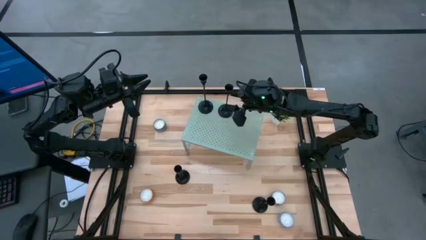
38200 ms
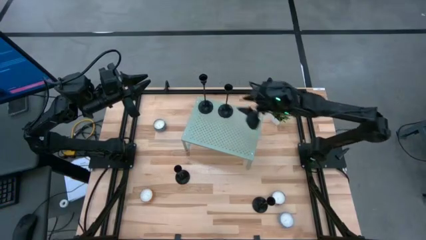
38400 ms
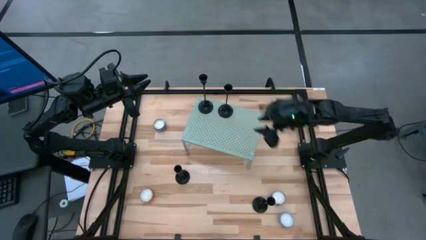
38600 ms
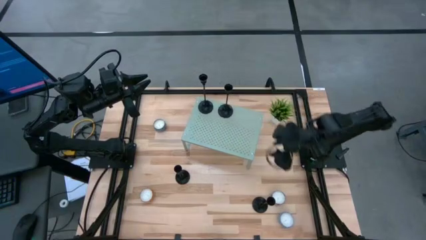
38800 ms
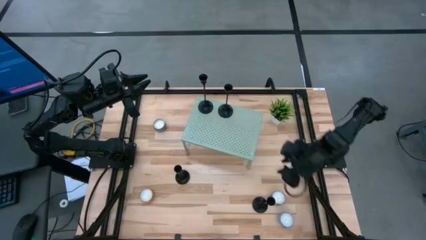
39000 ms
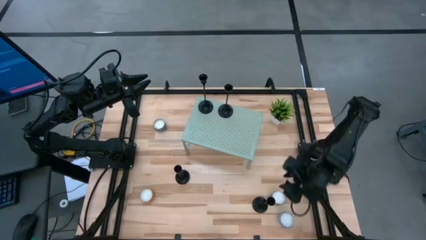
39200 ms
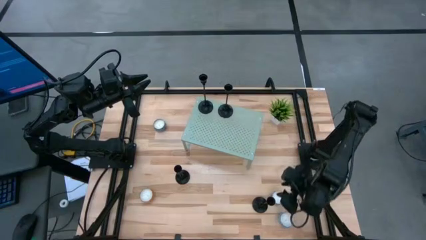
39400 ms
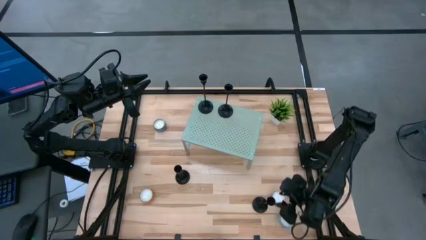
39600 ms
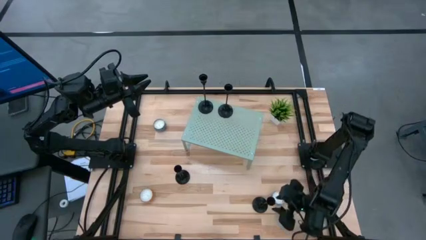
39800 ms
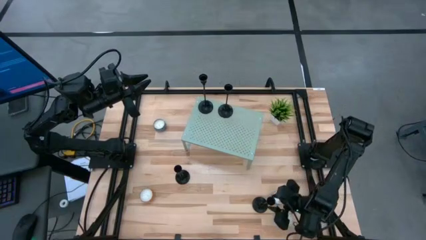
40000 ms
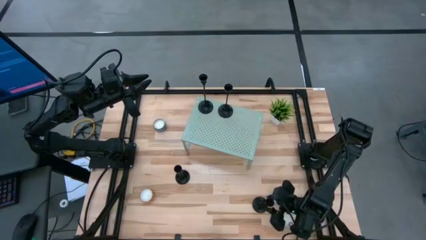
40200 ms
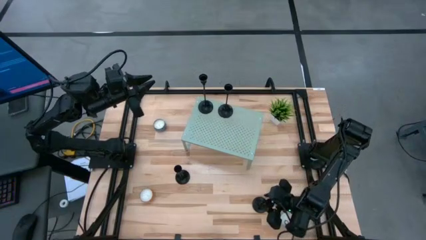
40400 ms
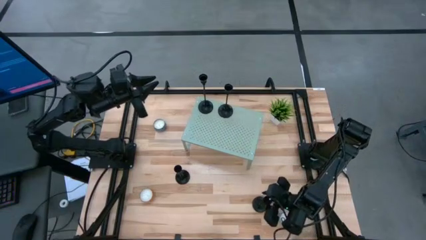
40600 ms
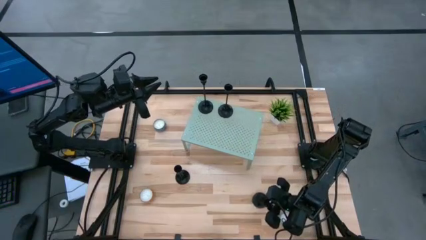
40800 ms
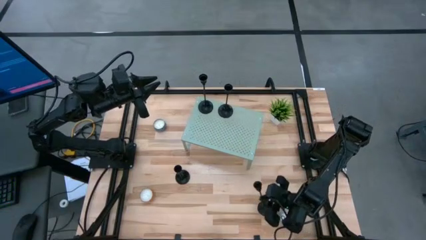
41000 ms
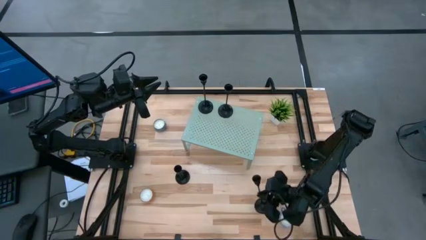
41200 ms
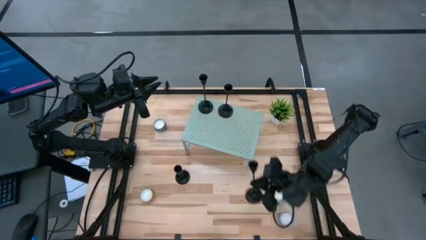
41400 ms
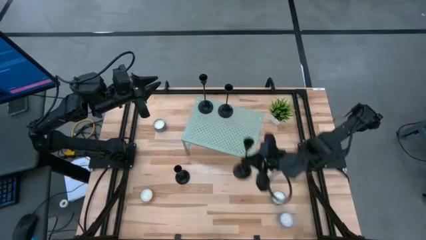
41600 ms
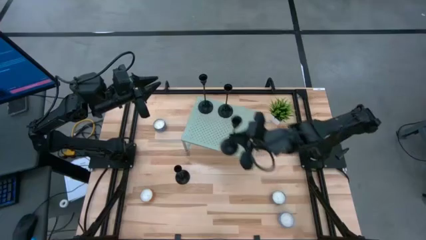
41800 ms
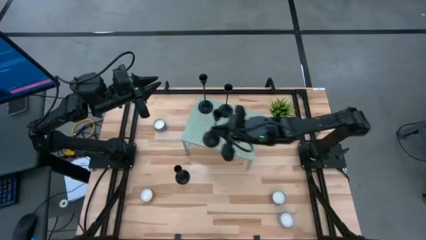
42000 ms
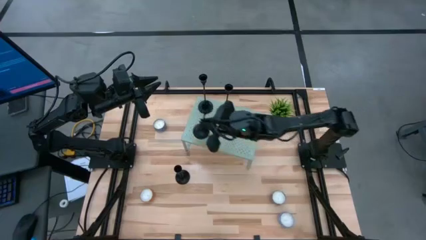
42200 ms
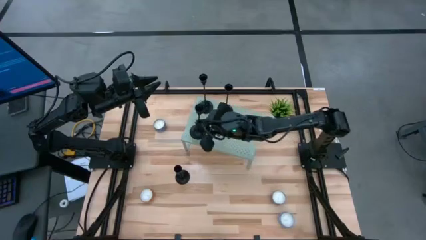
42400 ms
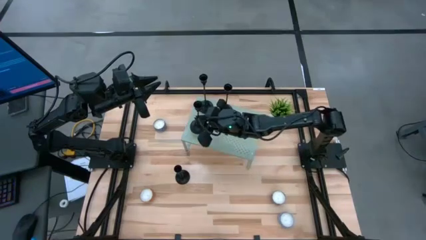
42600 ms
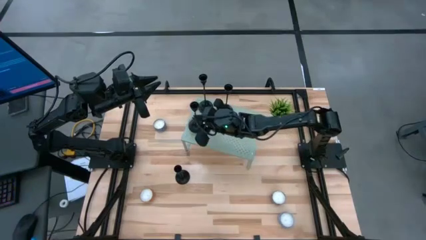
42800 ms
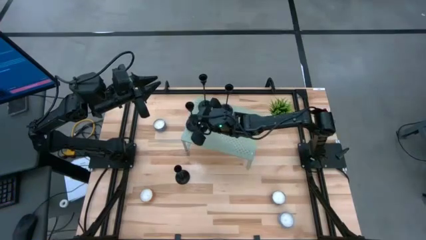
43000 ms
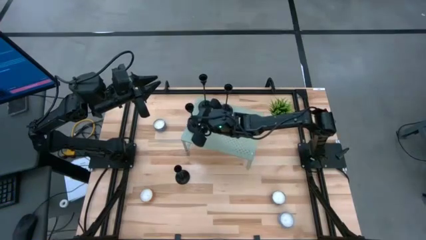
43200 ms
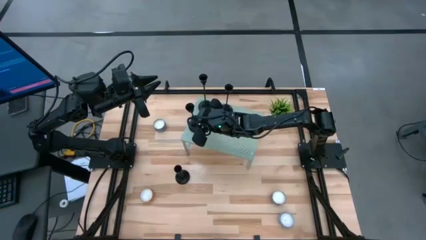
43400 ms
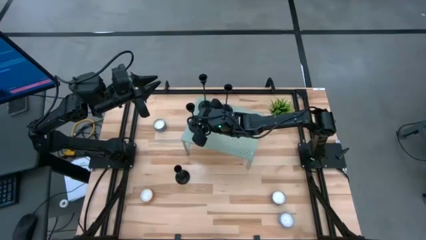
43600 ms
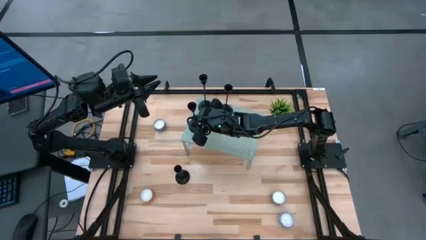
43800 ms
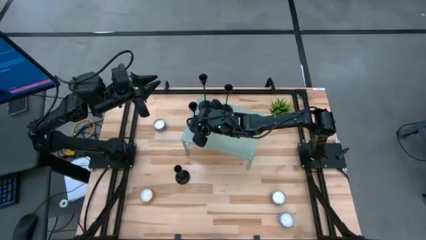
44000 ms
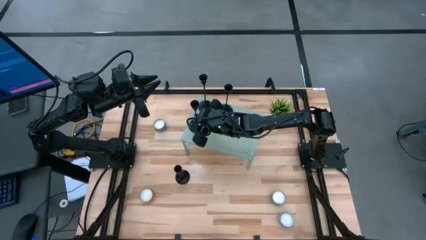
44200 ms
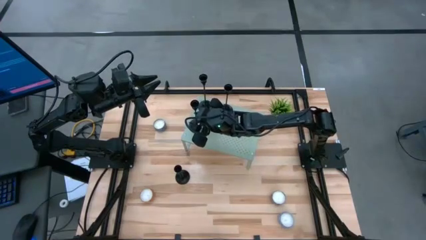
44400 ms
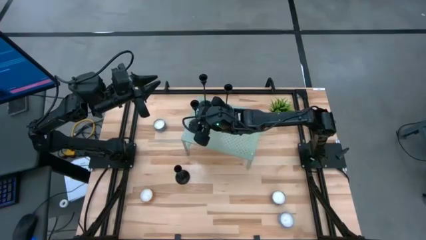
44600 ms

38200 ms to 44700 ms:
Task: Pick & Place candle stick holders
Align the black candle holder with the other black candle holder on the shelf

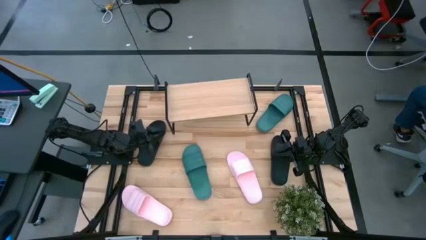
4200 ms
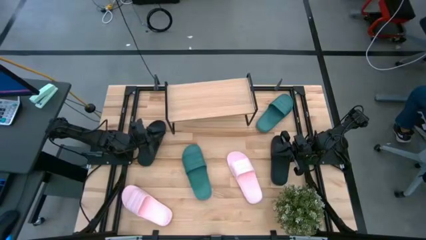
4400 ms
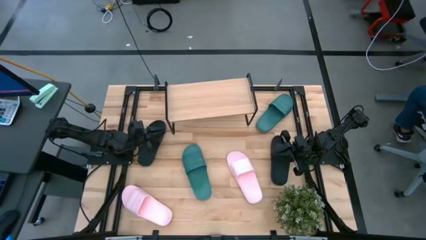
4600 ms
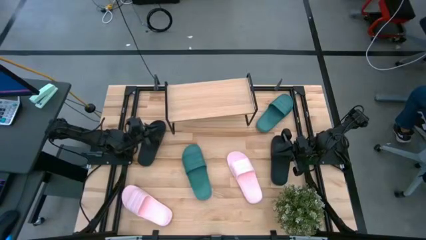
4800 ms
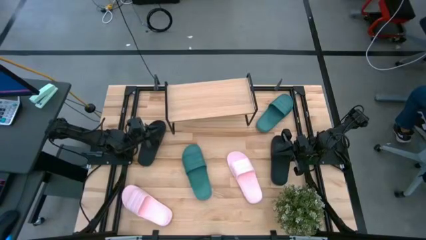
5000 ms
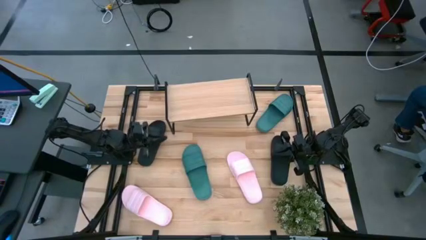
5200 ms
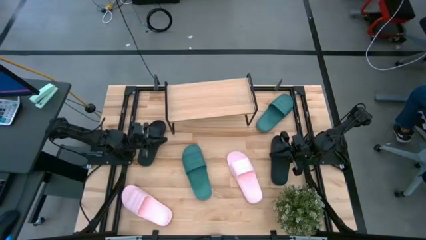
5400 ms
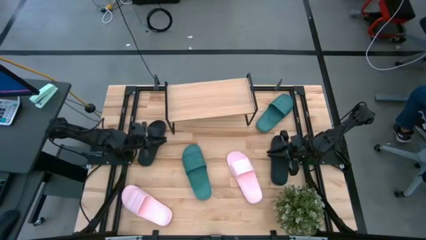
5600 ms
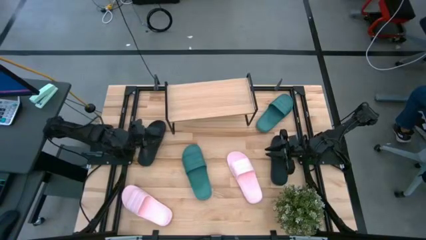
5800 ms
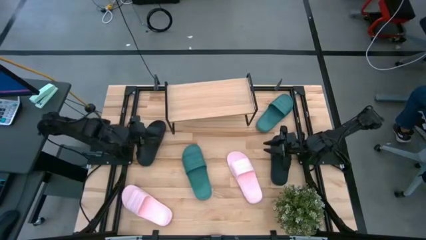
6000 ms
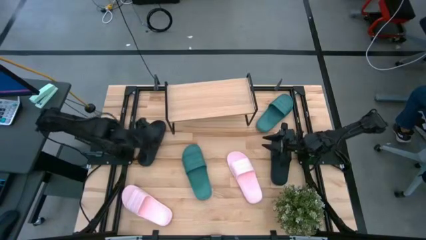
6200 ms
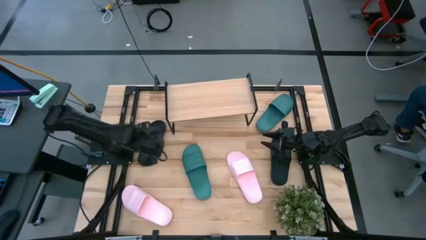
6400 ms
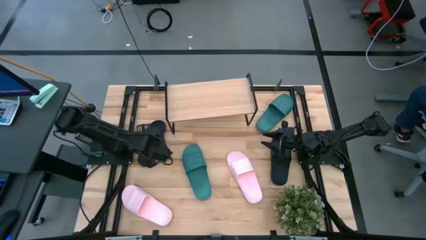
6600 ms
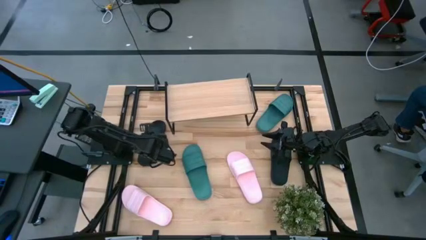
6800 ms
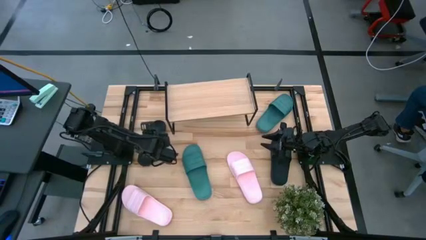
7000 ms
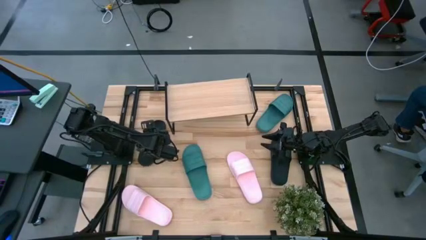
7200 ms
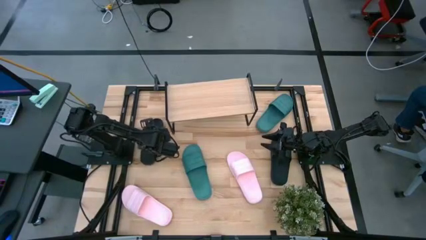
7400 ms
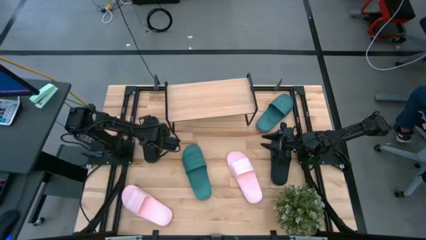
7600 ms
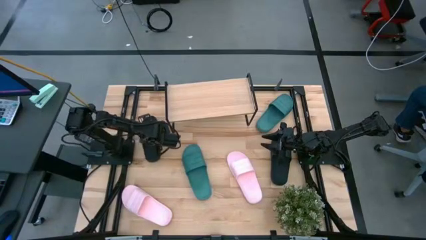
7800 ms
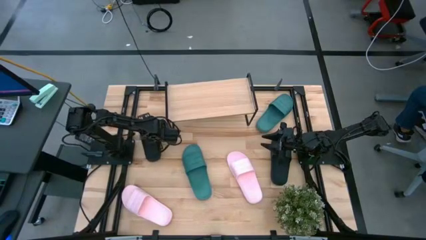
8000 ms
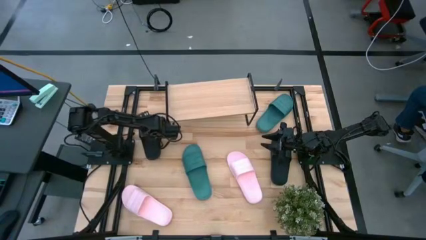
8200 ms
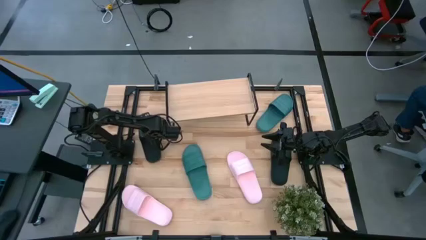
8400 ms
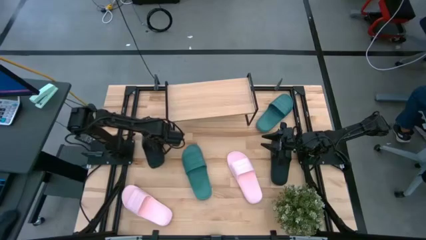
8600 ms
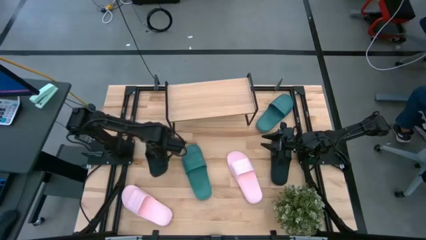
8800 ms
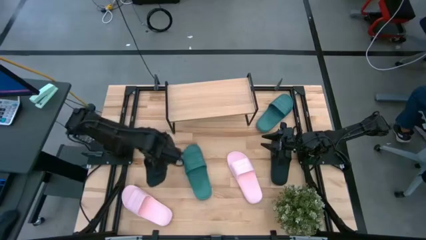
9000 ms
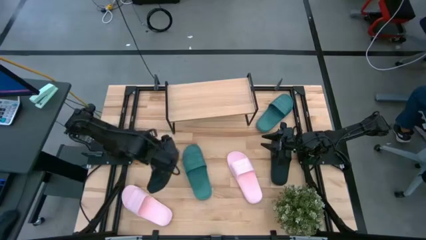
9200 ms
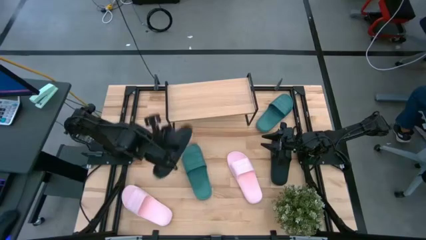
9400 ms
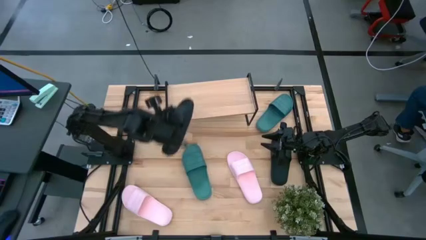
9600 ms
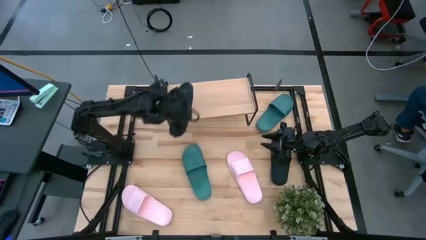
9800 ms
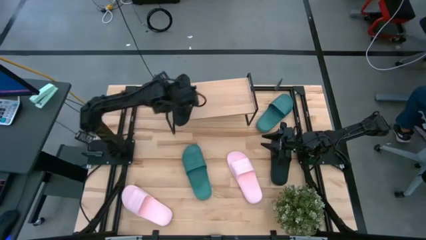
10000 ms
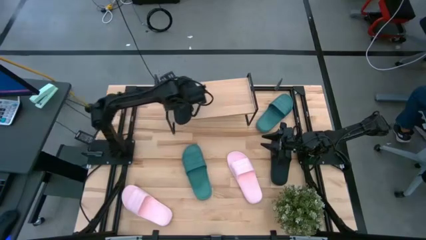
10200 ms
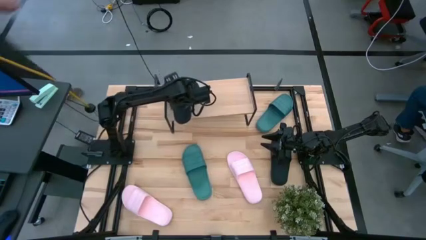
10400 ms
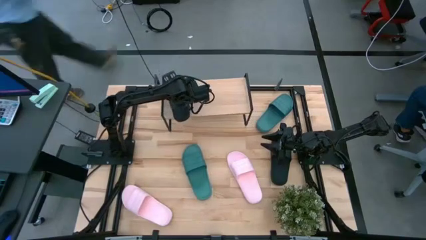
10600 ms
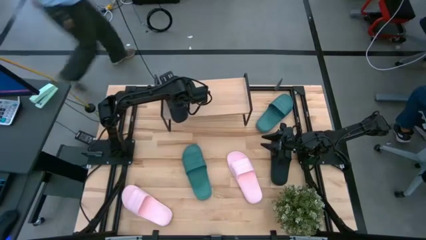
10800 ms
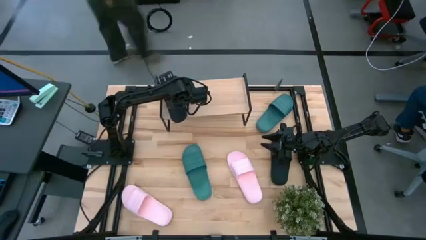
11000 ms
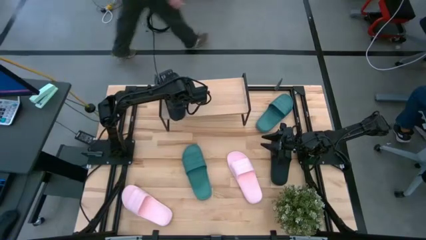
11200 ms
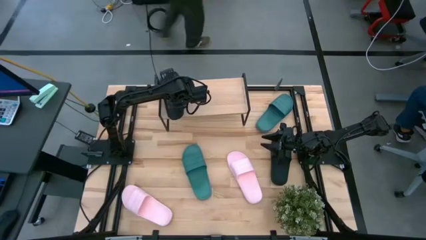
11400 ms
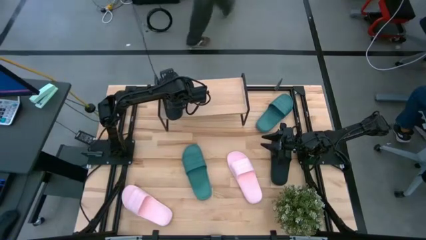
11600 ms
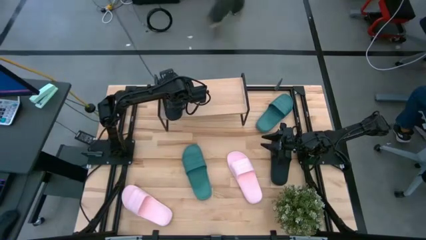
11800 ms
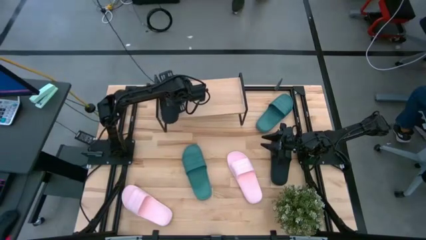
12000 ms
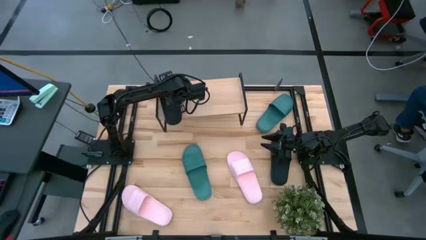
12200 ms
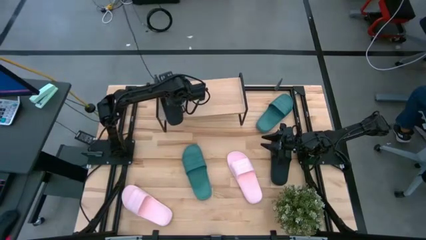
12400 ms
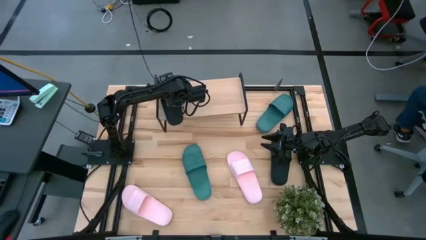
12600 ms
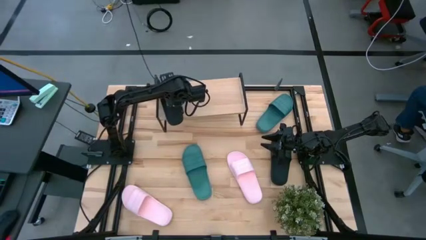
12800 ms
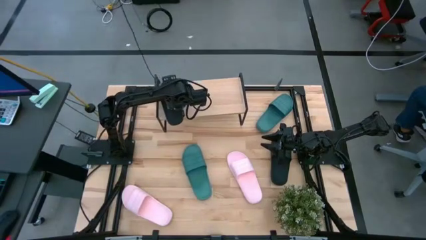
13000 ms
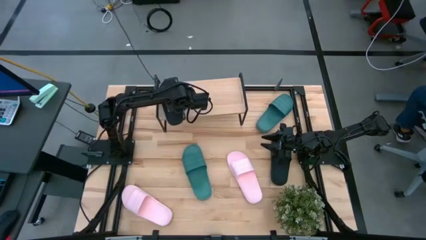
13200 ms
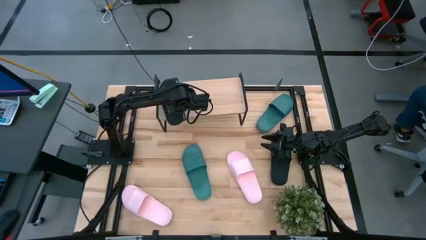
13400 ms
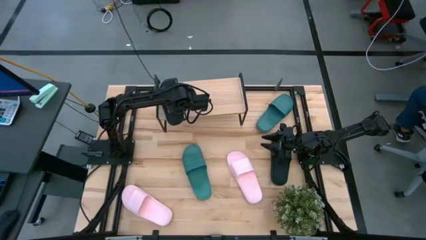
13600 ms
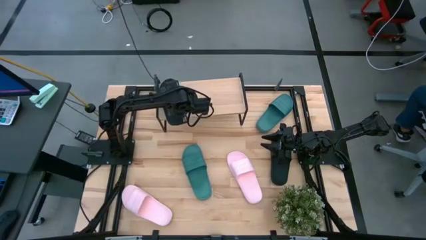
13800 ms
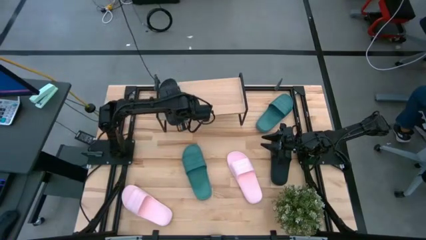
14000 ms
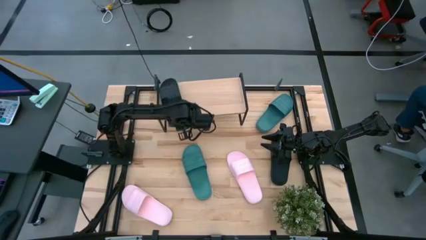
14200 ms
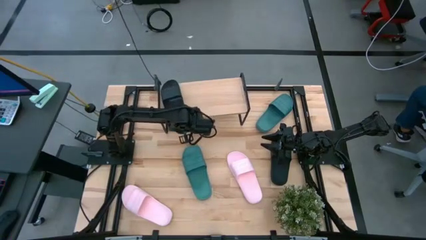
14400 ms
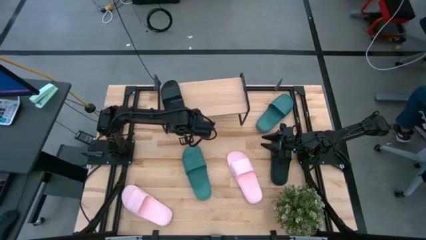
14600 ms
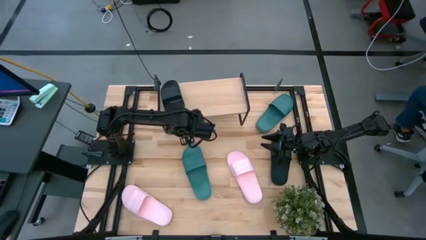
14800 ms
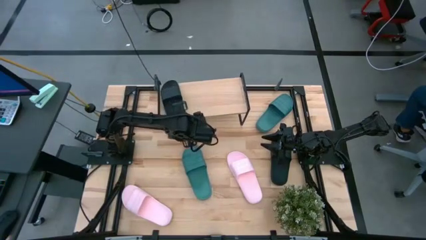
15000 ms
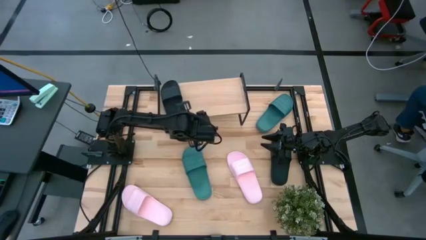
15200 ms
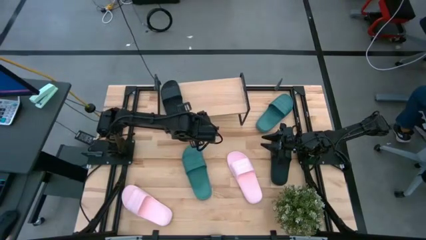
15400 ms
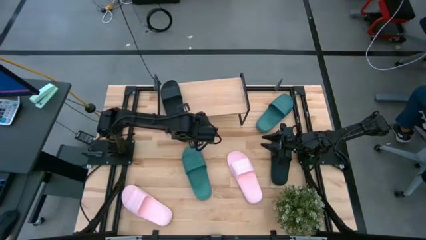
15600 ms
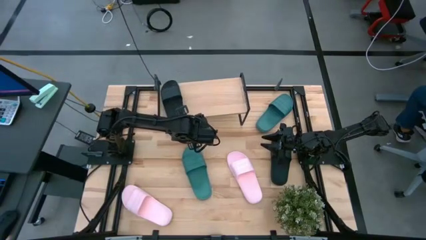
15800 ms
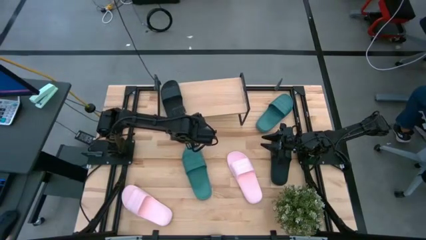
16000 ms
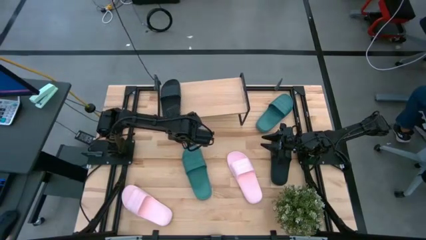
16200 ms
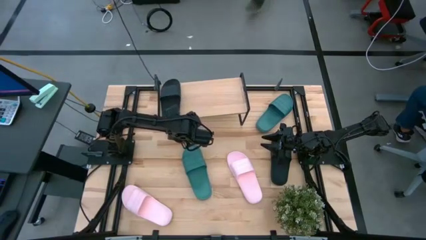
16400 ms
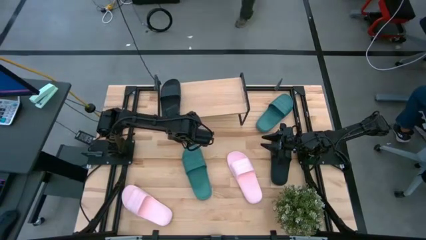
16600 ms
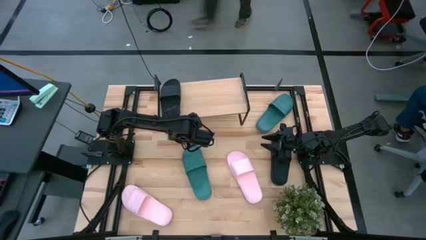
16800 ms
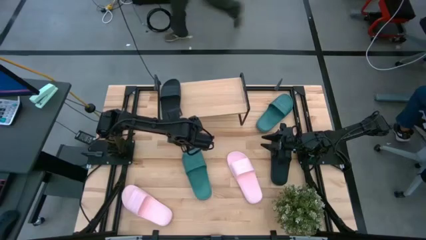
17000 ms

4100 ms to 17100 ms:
Task: Pick and place slides into the shelf
Put the left black slipper on the shelf
